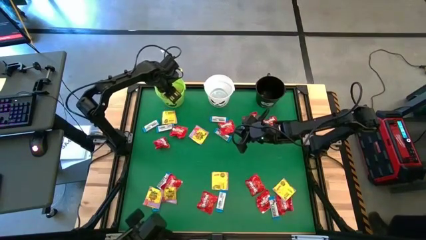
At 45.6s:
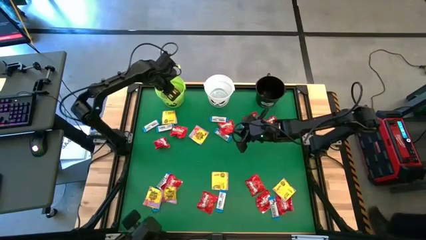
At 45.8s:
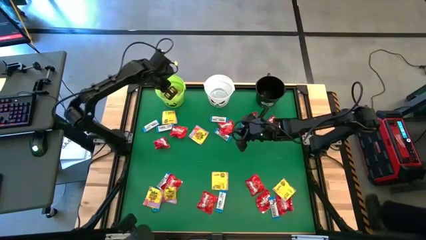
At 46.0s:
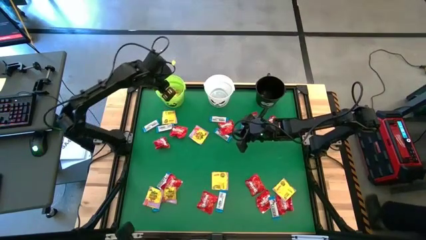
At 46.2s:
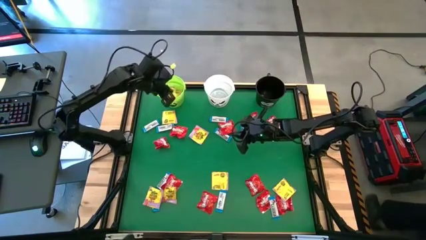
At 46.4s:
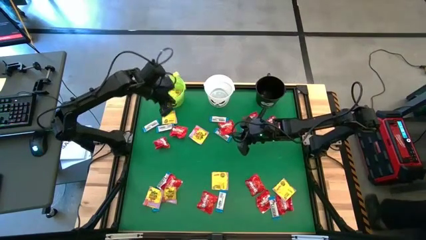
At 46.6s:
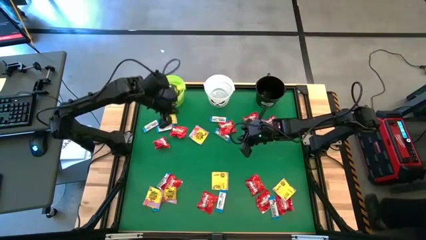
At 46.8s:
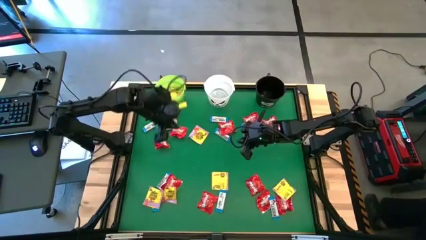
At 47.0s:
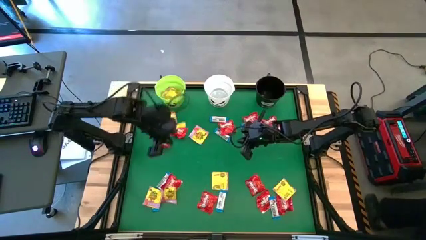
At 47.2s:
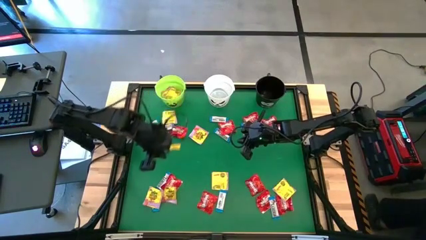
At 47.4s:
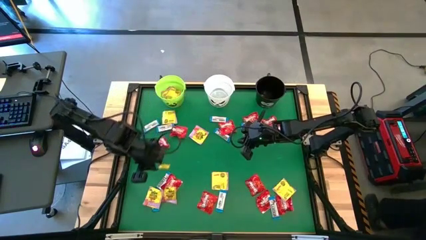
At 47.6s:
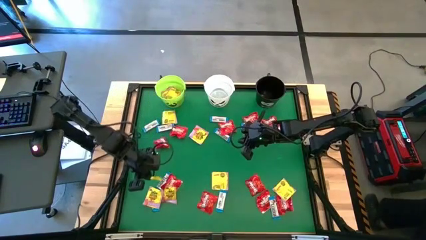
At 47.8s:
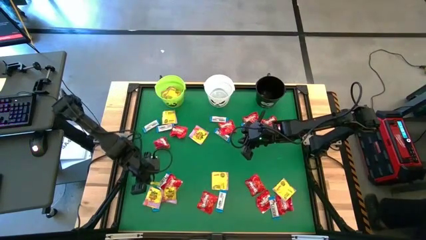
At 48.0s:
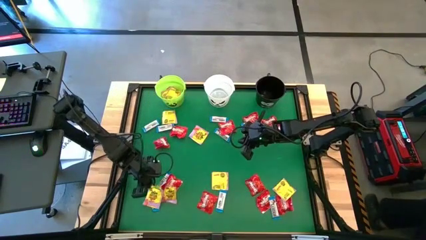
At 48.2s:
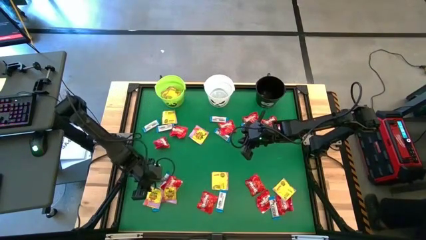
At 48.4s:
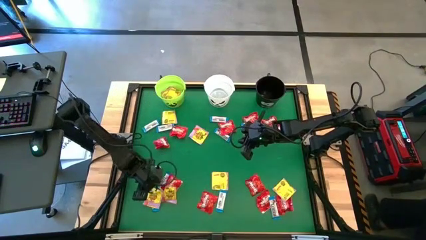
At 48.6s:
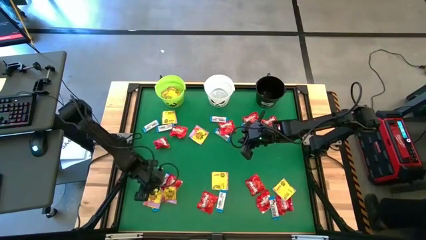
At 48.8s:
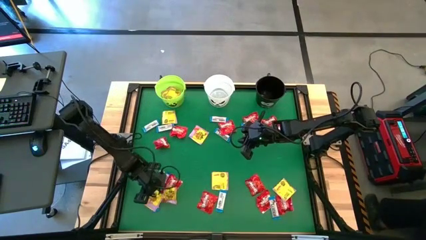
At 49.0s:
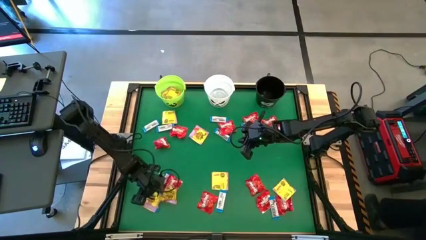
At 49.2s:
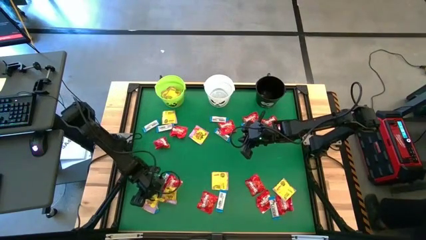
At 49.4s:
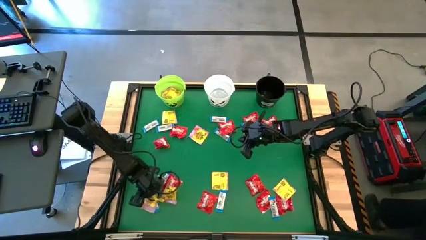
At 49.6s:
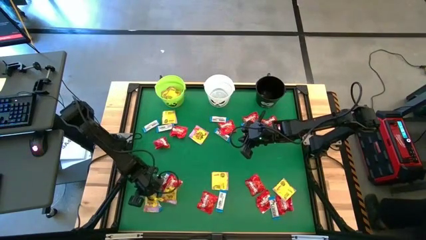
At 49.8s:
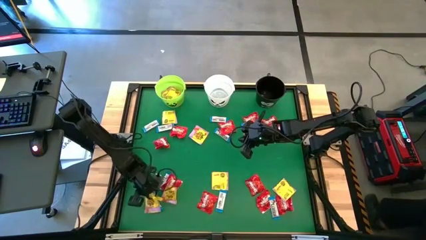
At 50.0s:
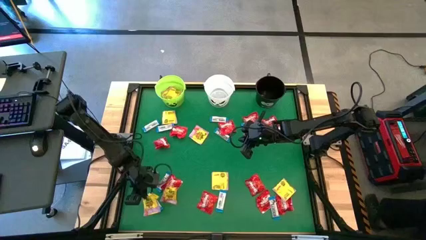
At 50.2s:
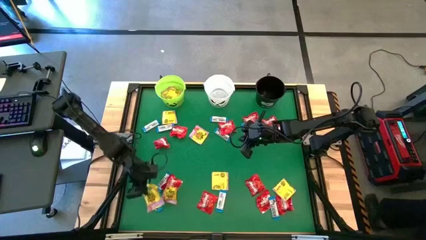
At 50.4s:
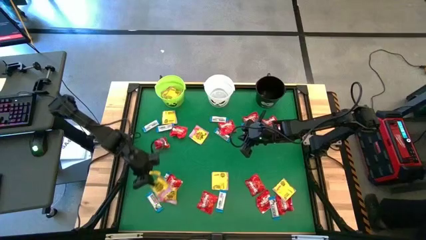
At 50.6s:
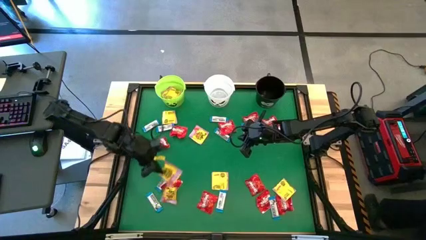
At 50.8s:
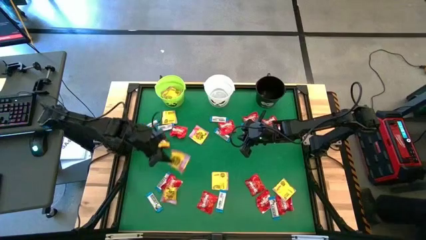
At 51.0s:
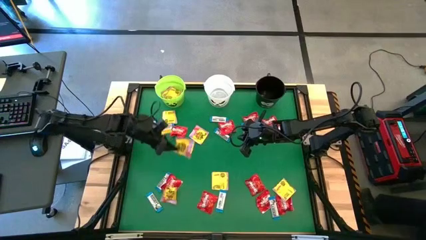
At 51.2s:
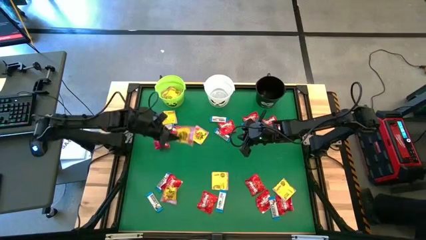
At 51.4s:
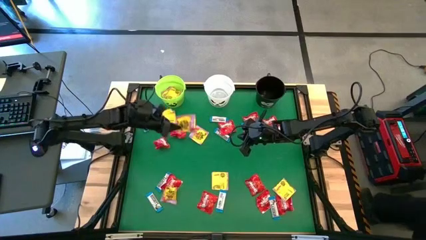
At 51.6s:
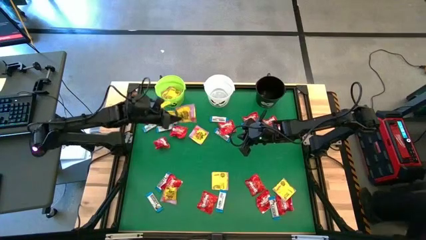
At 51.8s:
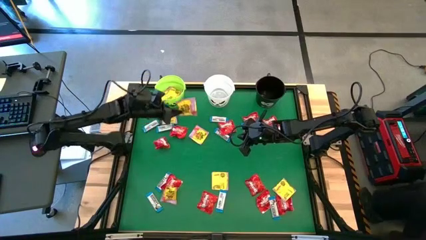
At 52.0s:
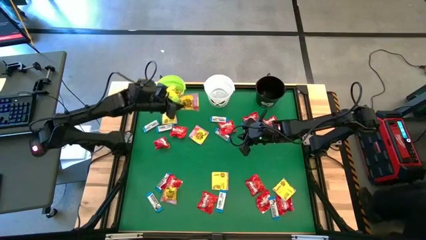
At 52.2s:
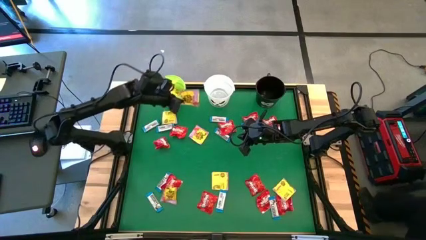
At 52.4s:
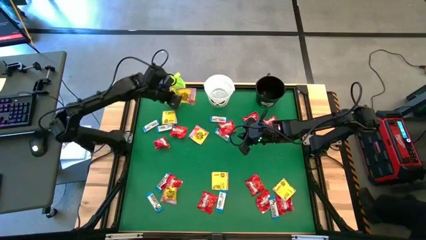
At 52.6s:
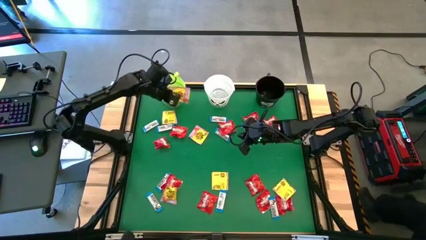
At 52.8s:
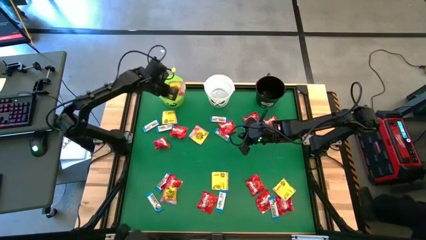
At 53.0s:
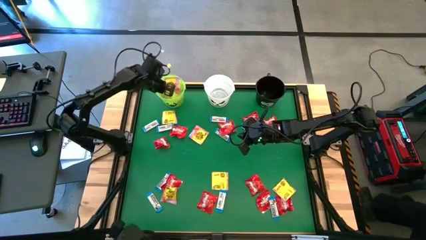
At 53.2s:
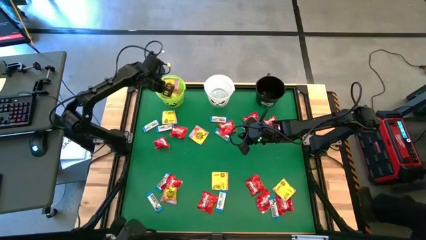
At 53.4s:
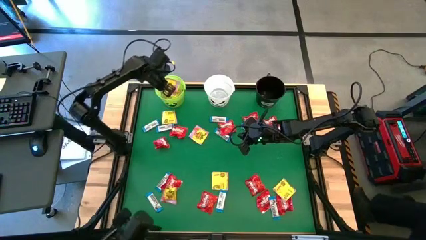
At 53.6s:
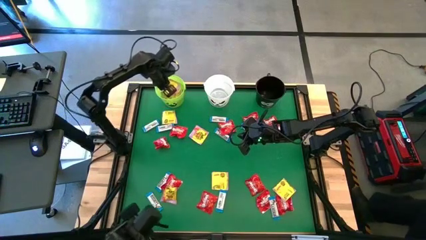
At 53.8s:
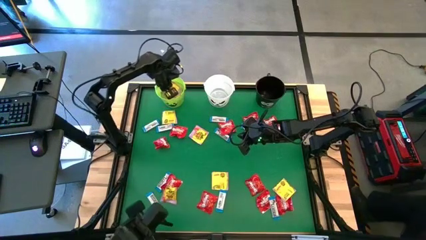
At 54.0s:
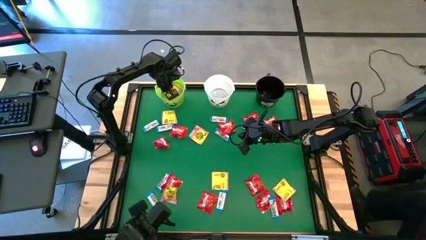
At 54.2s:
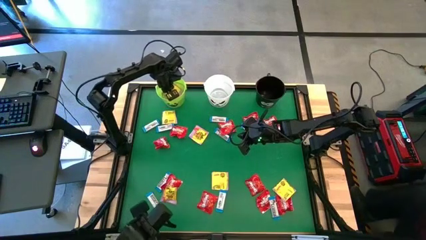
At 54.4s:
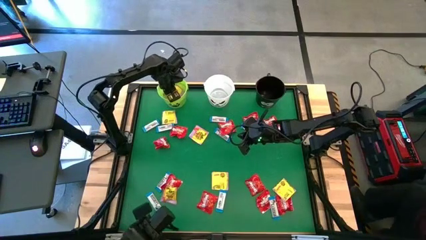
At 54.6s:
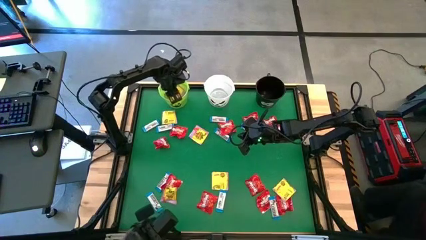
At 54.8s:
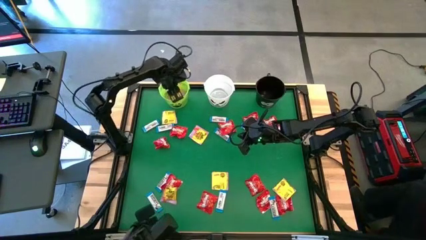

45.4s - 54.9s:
Task: Sort candy by brand, put in halloween buckets
Put the yellow candy into the green bucket

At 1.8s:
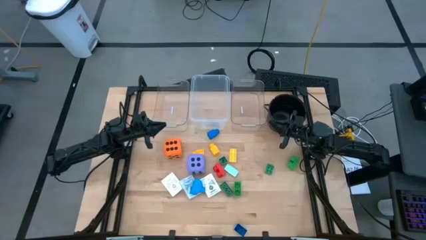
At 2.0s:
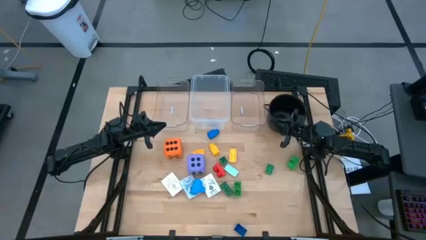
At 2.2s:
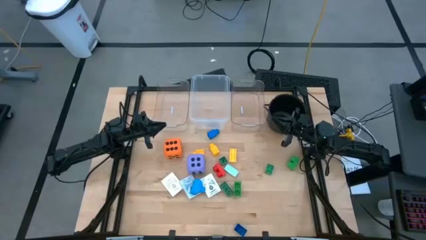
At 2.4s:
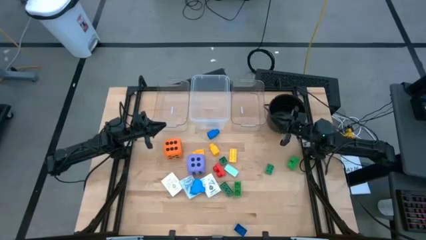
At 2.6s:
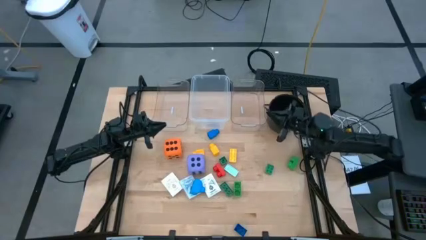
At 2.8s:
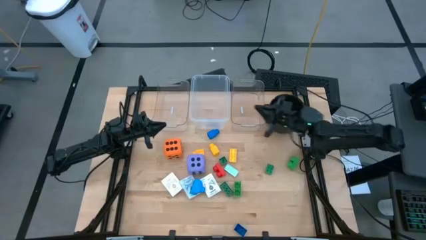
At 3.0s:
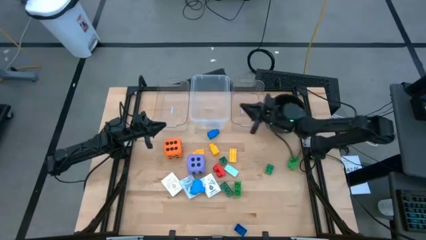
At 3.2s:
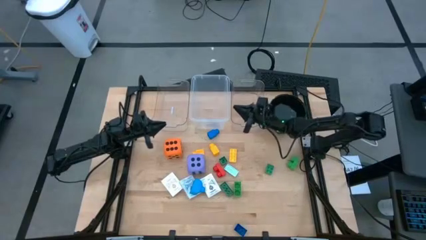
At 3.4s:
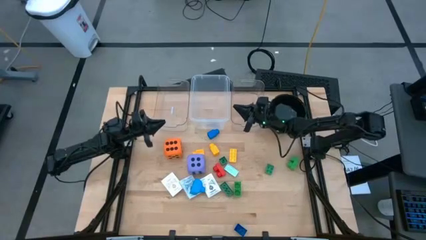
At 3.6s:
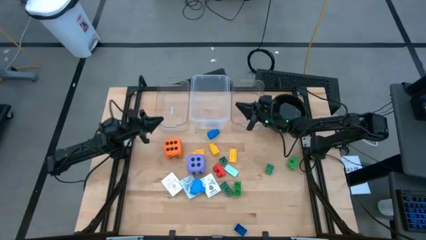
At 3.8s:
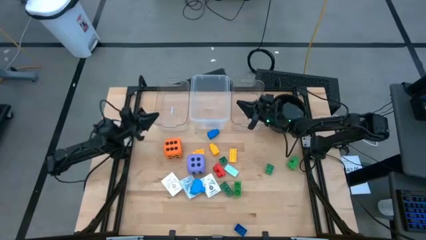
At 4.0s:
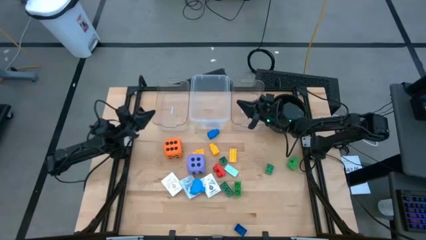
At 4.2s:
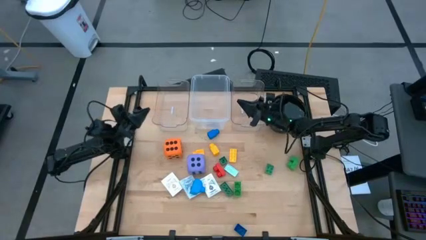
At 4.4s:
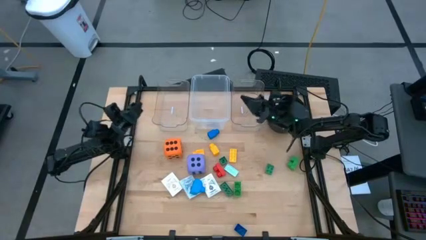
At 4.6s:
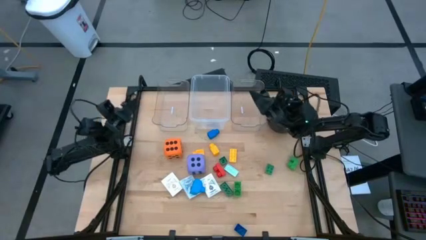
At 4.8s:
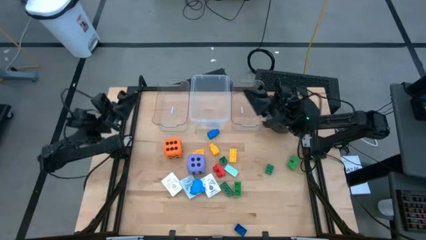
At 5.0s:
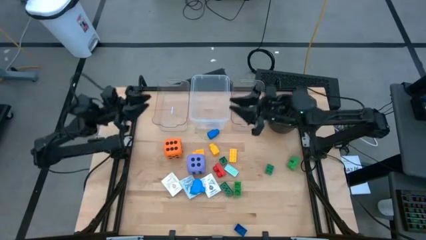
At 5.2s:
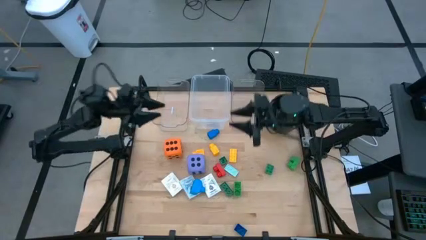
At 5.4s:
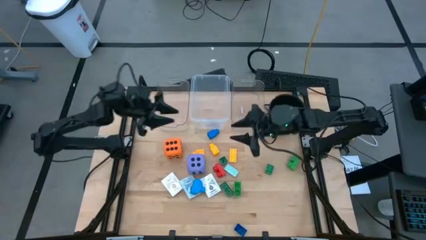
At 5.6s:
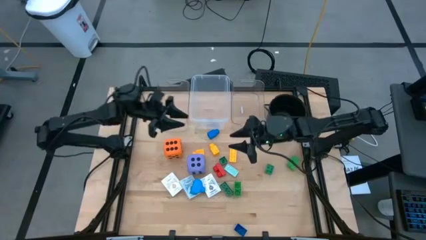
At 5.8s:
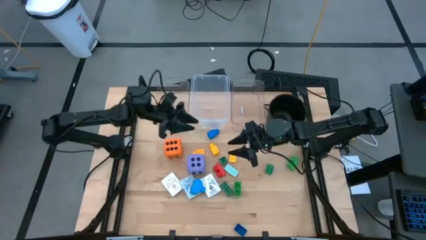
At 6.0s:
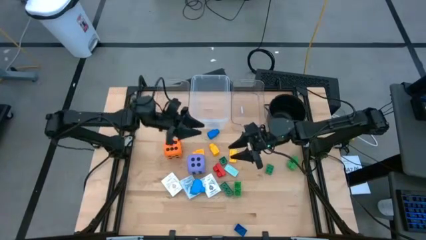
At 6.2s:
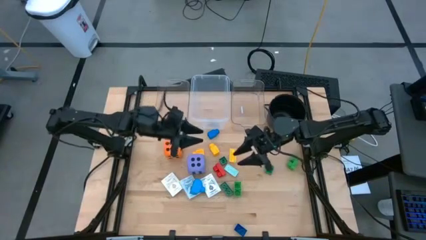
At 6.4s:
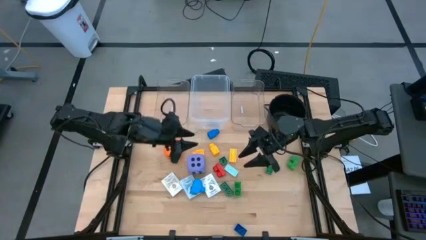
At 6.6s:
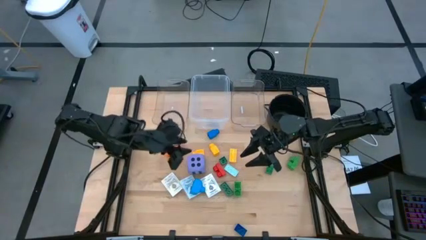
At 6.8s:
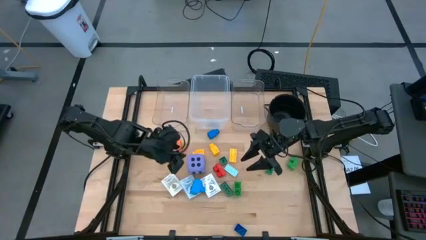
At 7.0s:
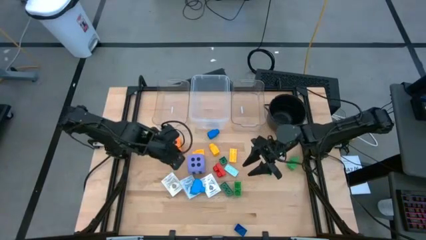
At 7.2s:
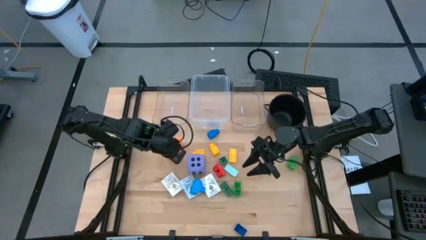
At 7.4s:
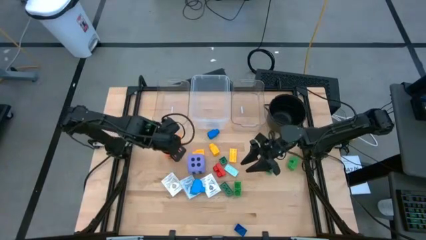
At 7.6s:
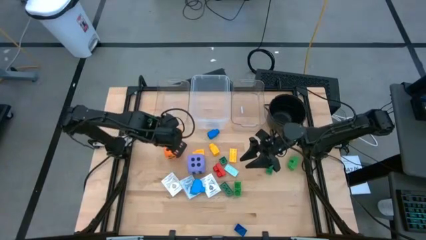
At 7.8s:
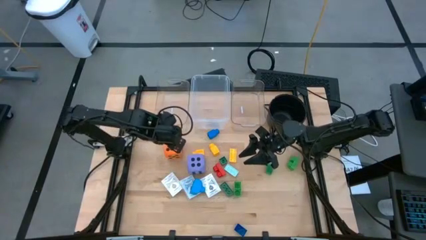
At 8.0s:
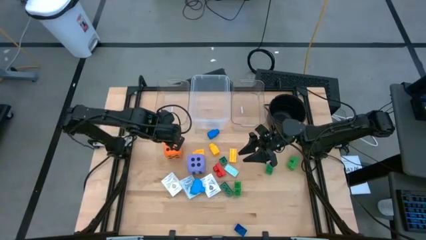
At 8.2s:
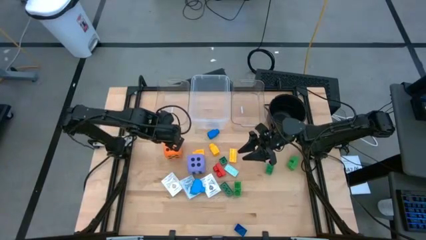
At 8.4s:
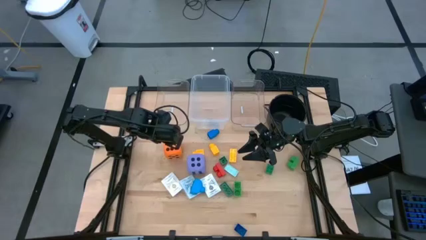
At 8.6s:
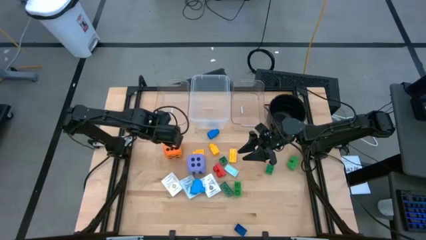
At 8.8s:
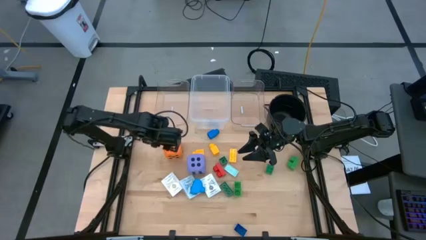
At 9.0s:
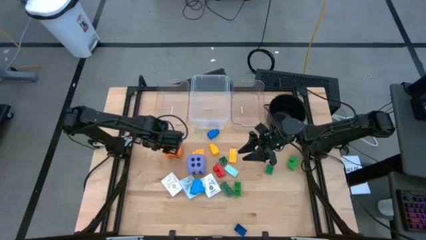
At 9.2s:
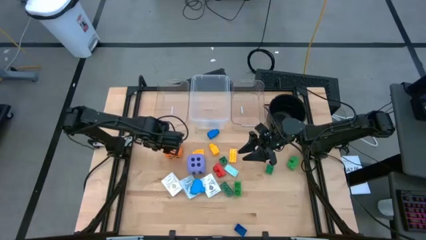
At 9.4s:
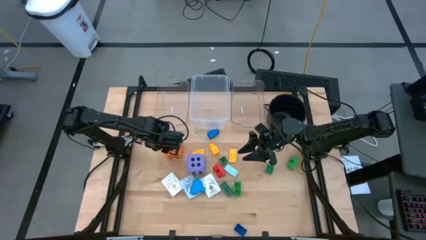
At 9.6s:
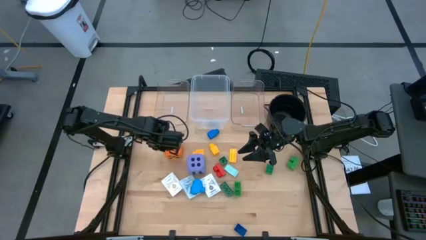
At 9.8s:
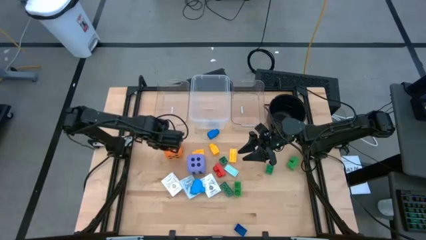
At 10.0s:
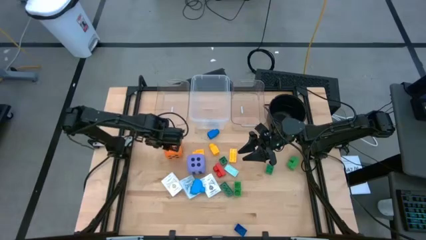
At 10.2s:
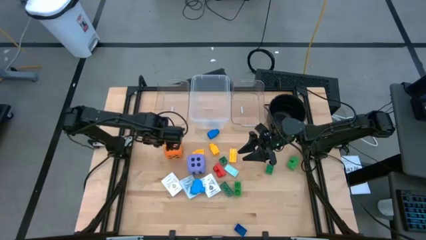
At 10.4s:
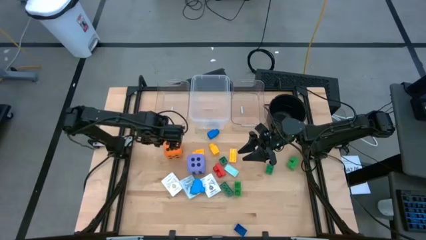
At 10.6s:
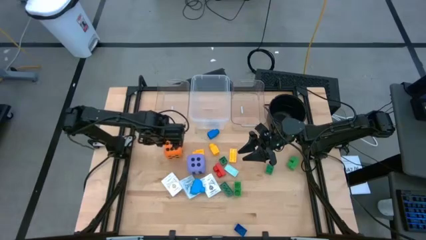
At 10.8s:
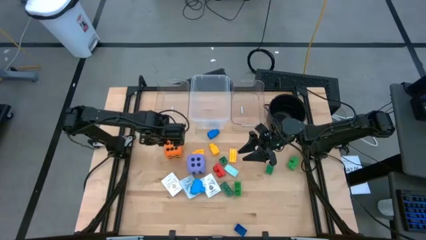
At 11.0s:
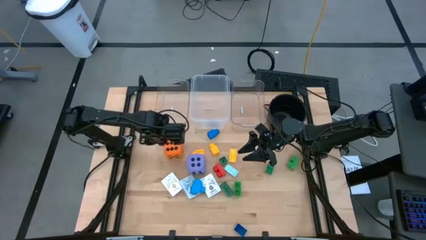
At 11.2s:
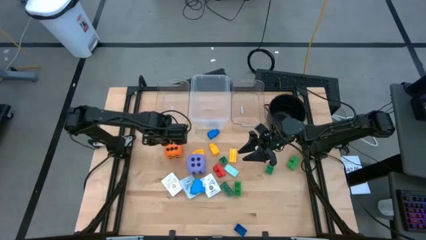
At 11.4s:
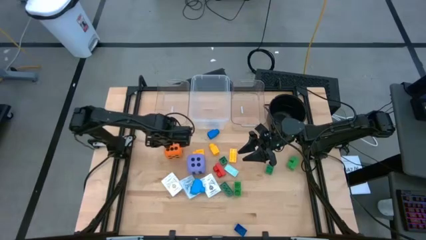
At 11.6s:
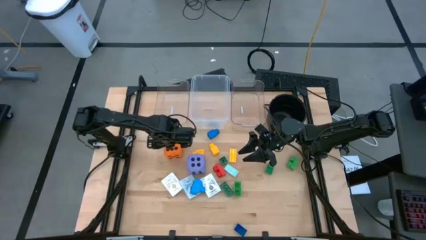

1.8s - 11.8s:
Task: Pick & Place Toys
Put the orange dice into the transparent container
